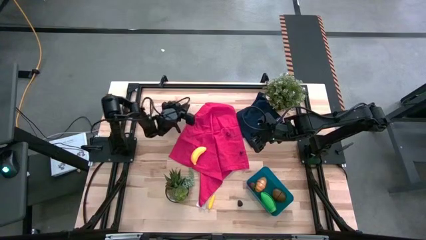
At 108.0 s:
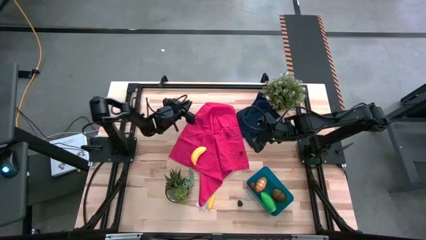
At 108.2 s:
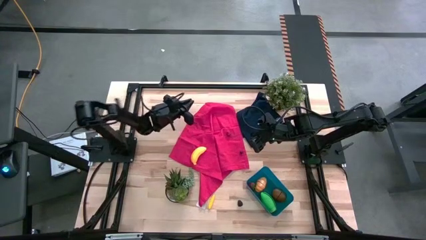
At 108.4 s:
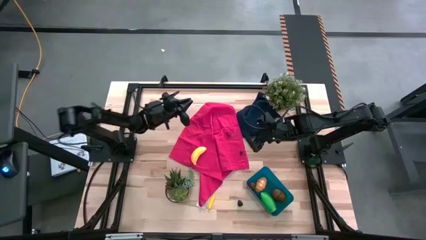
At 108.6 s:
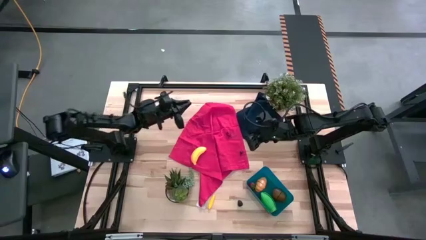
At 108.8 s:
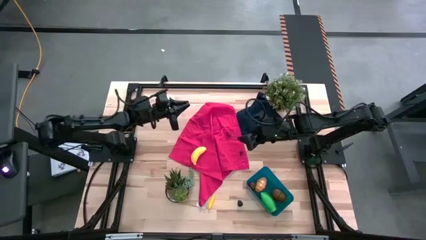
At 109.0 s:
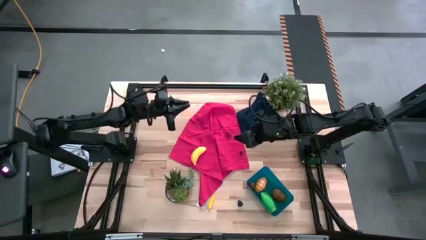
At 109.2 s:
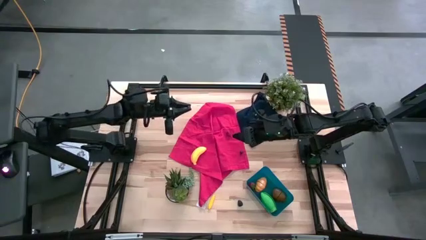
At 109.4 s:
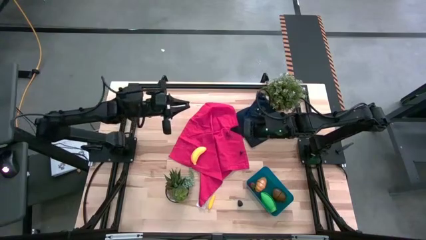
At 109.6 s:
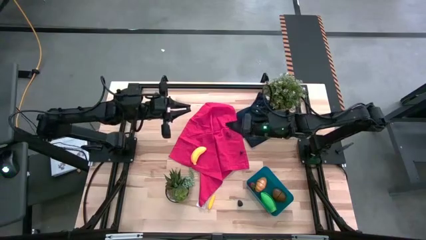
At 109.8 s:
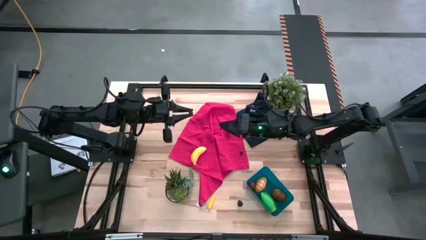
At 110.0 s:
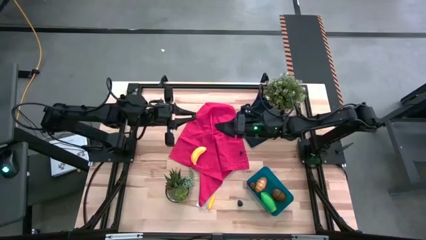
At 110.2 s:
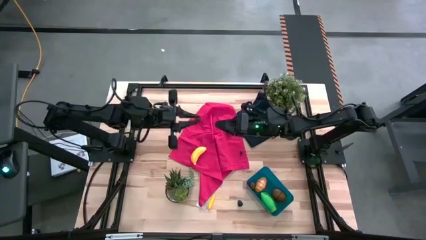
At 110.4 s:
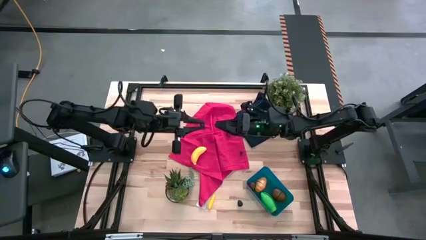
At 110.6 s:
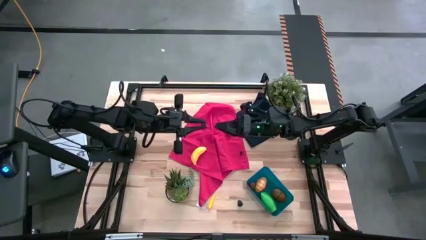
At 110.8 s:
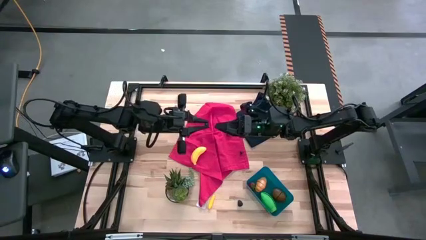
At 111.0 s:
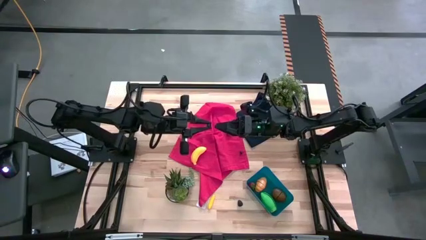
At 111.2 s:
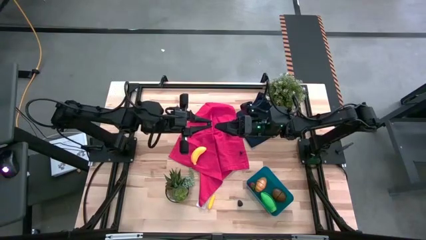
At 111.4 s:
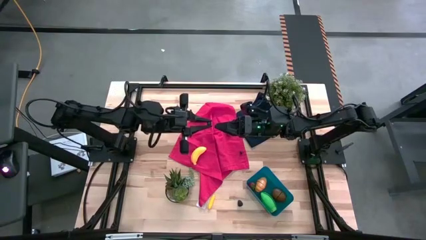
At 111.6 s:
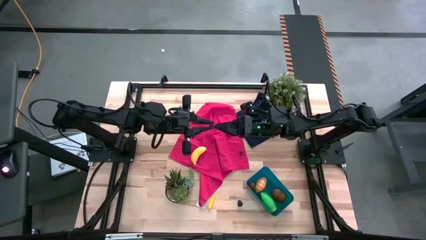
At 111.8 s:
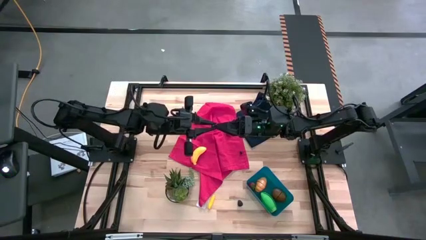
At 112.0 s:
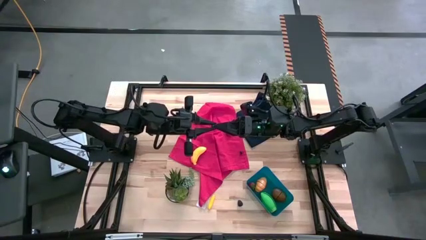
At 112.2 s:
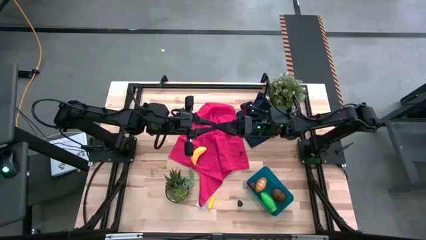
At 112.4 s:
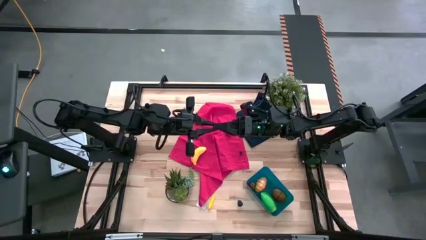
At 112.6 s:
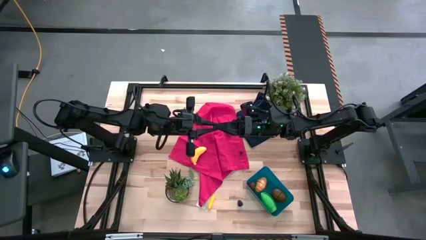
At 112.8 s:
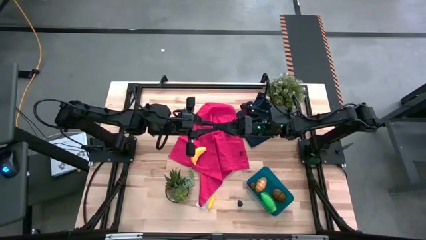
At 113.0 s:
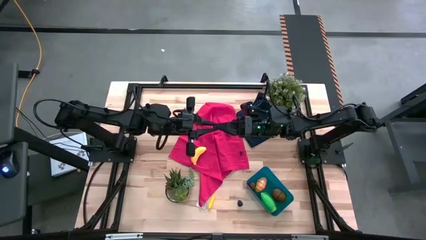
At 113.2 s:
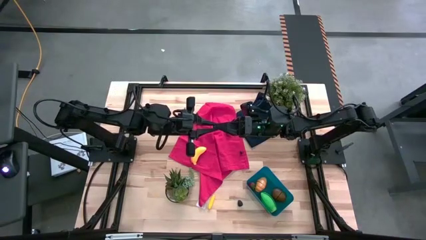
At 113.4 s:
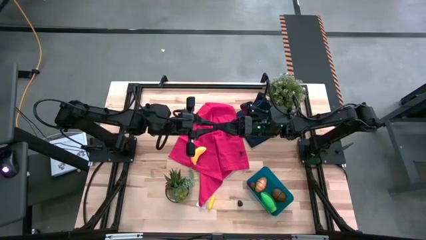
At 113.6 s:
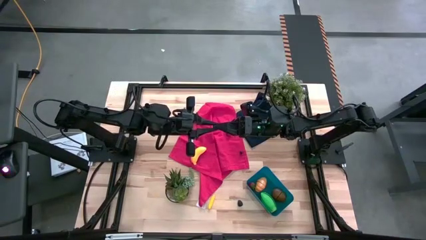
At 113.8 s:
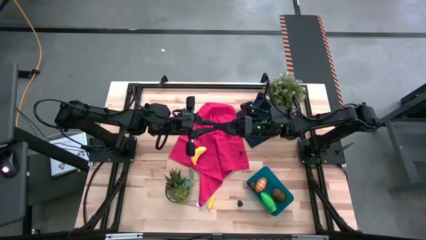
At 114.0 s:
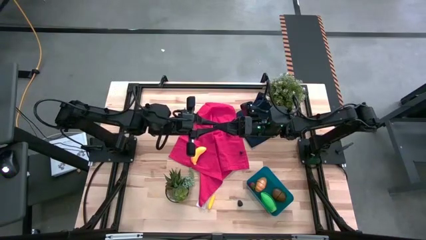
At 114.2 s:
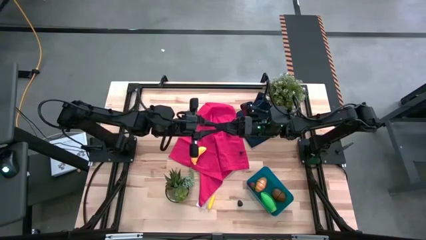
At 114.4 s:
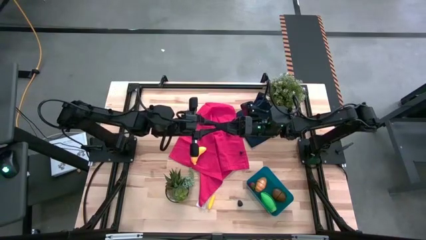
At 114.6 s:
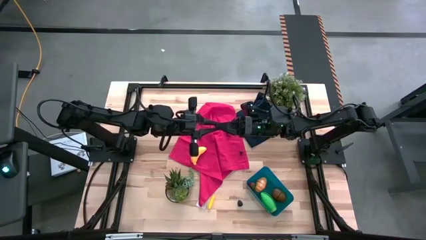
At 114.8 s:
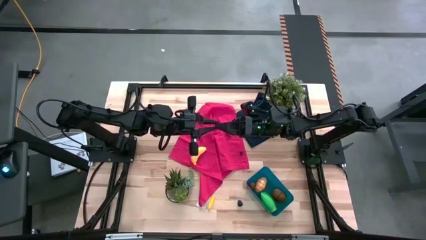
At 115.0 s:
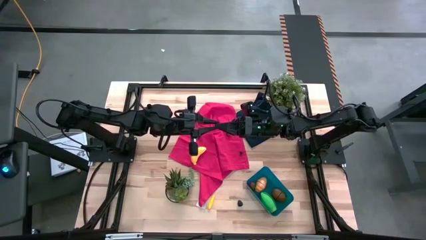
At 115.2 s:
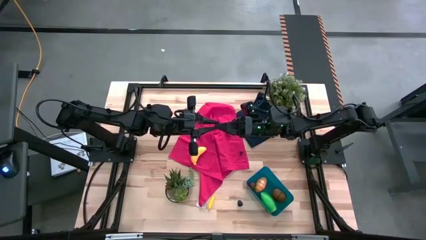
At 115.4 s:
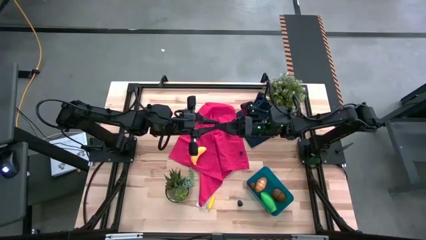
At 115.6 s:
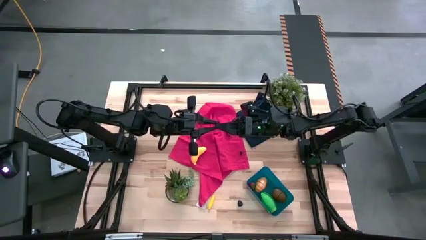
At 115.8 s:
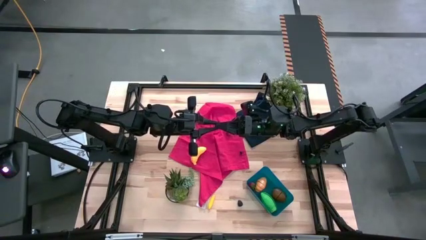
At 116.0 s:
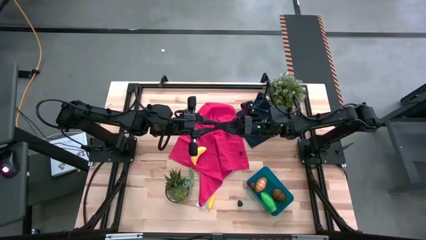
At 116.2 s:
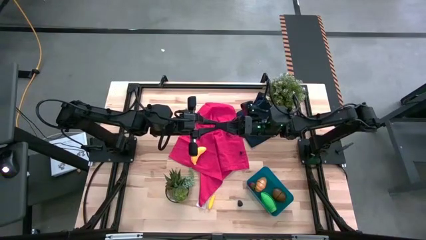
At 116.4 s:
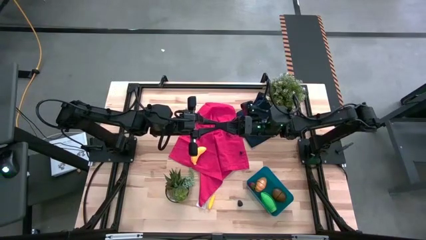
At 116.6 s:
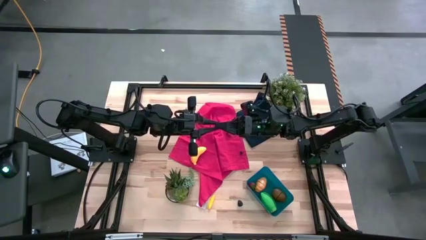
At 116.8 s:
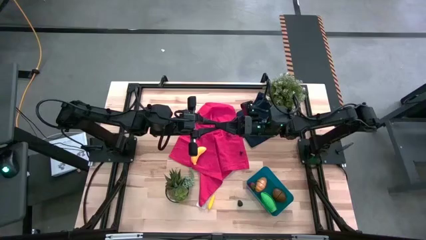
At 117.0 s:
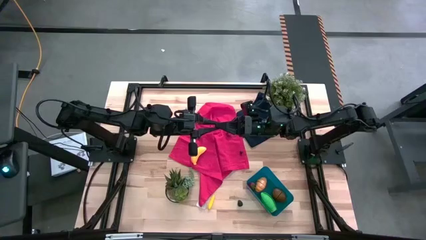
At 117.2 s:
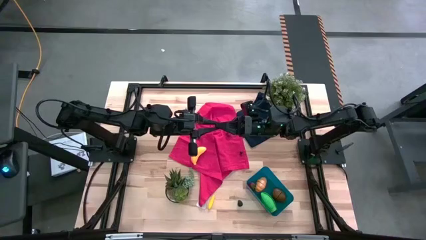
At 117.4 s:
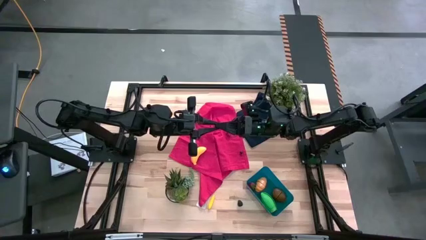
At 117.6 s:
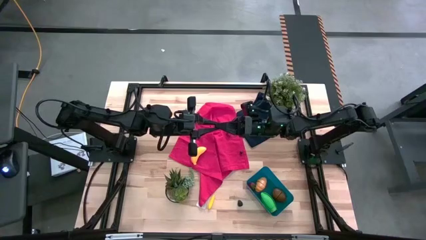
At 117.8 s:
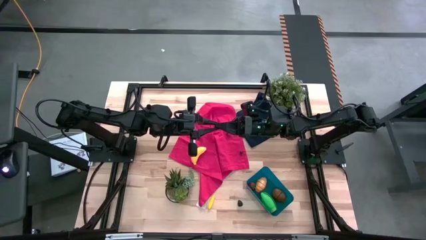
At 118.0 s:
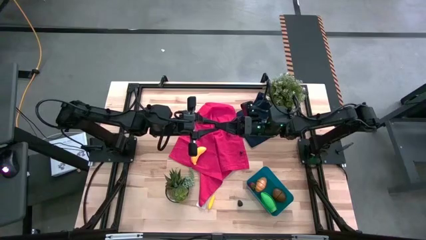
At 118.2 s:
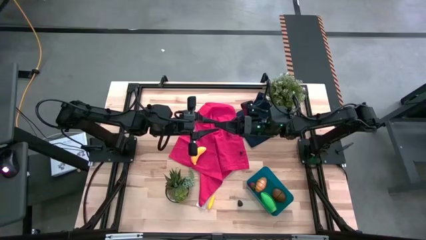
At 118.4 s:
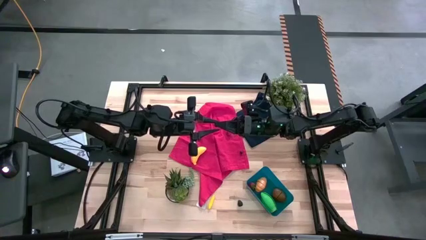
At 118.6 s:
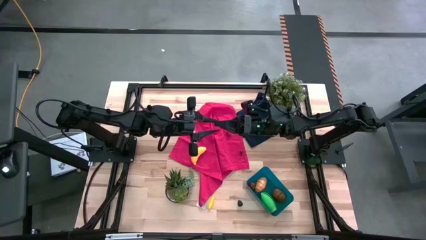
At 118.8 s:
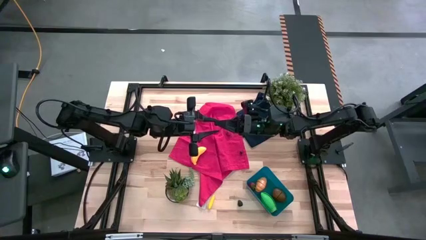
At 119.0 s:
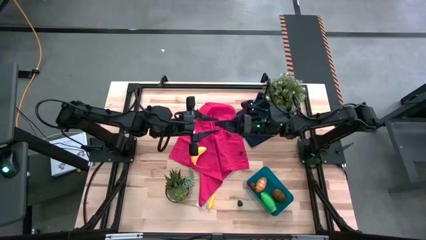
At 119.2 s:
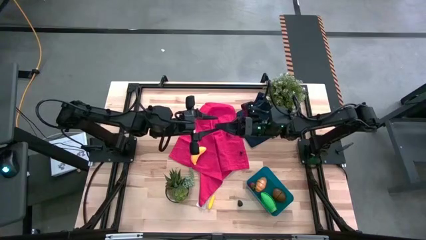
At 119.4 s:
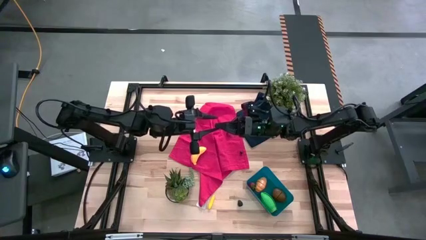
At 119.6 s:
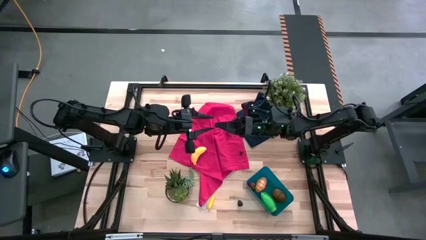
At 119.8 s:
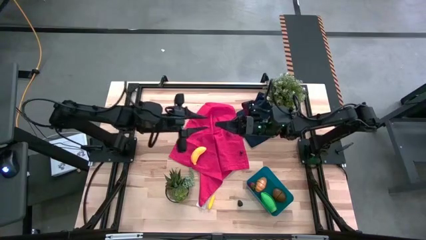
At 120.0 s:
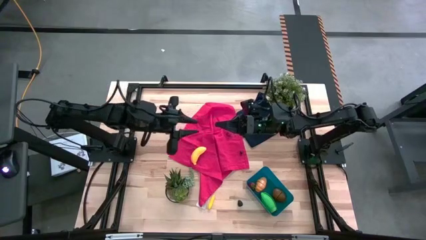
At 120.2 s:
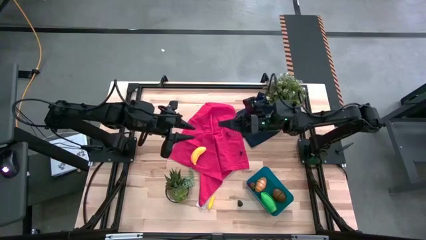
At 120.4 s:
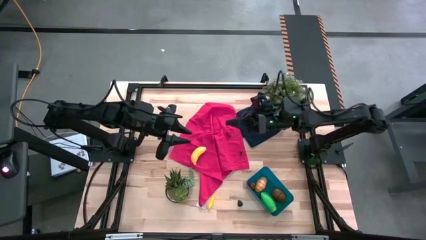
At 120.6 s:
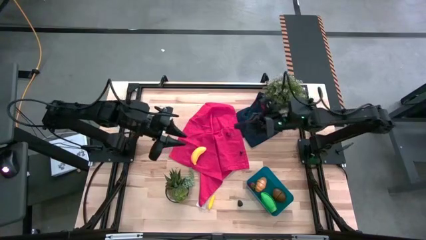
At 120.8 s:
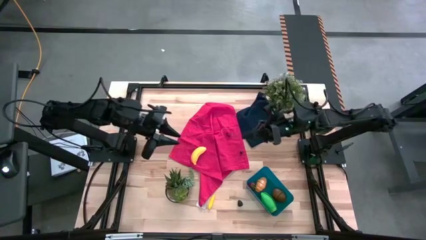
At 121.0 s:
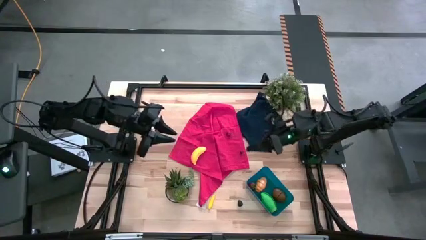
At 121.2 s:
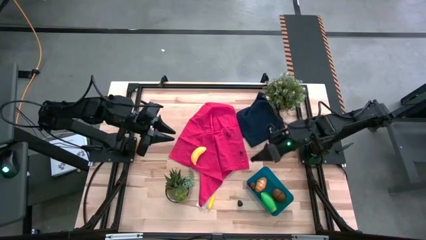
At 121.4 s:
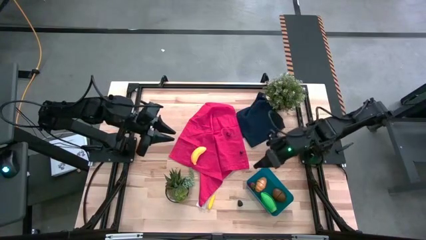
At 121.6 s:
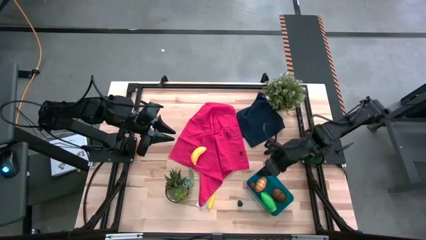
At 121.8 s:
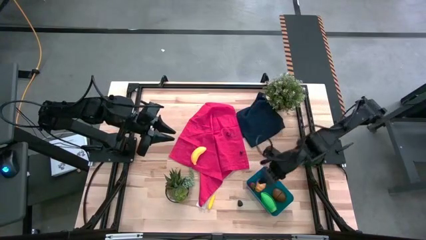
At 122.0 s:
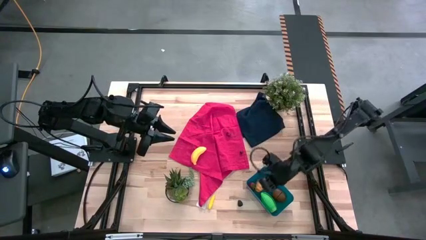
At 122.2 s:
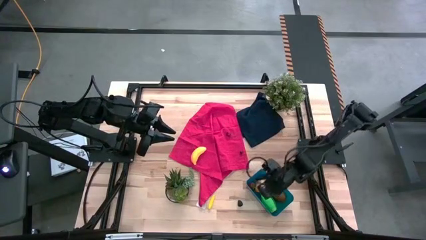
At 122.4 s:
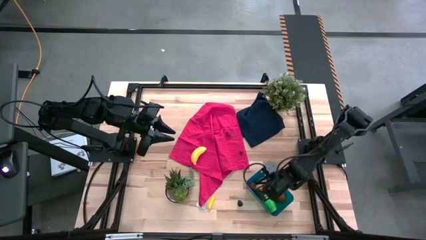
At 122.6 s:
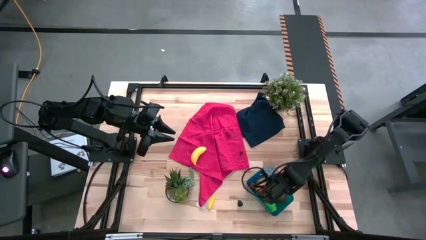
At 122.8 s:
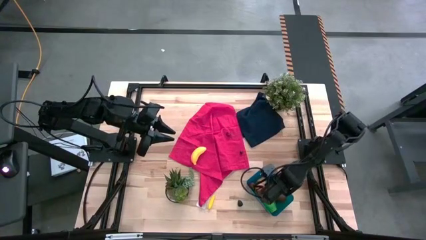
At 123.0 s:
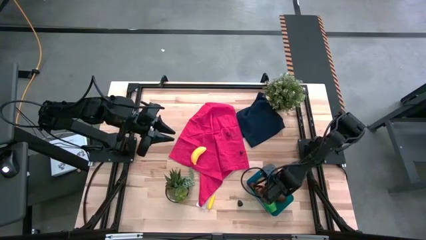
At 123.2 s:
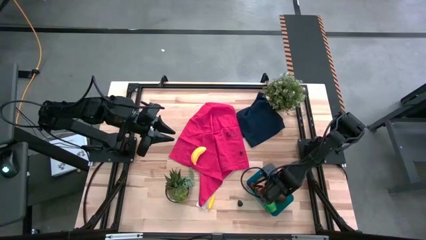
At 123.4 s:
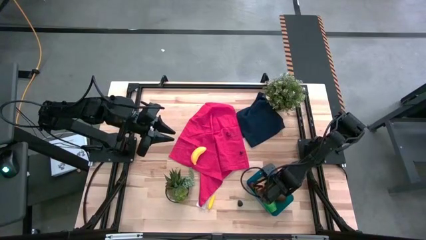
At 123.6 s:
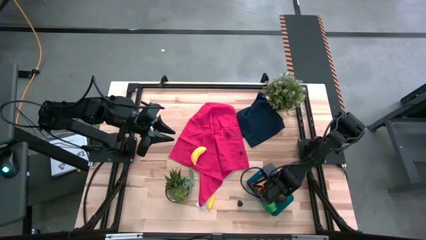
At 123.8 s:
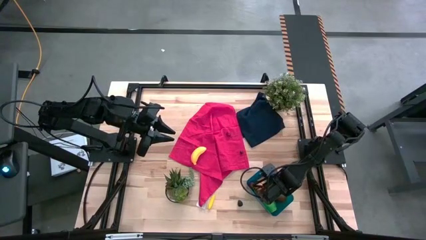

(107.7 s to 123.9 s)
Task: Pick and placing Produce into tupperware
Put the top blueberry into the blue bin
